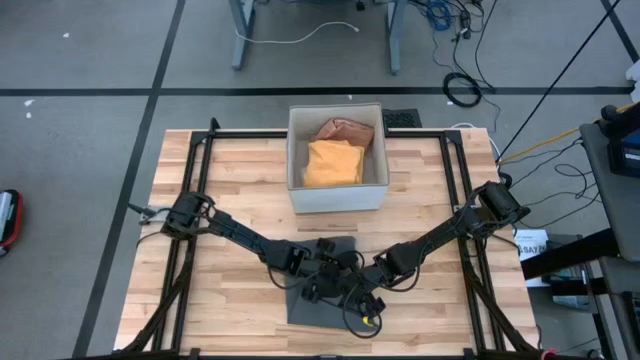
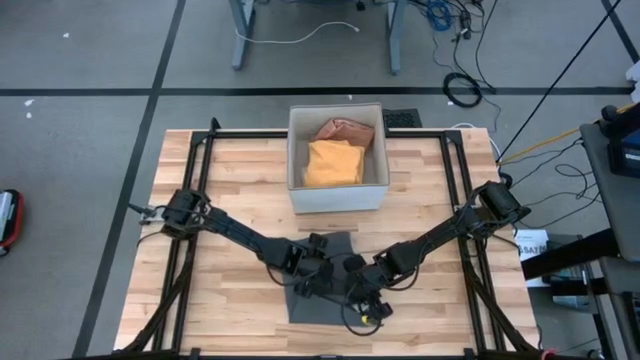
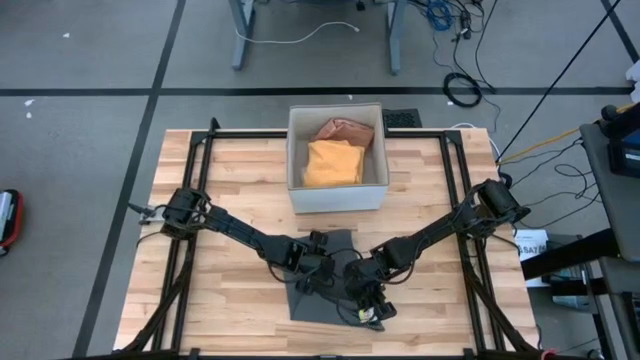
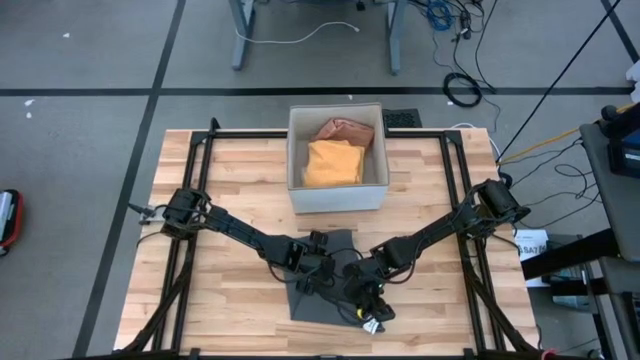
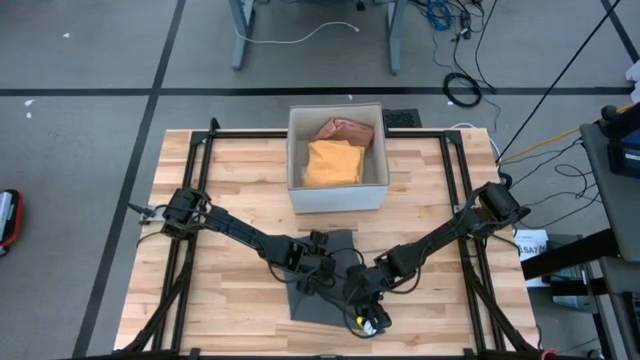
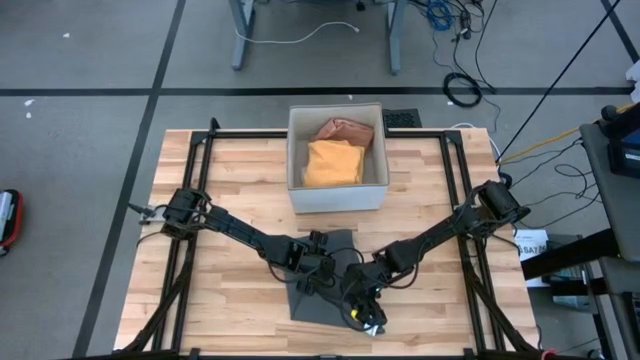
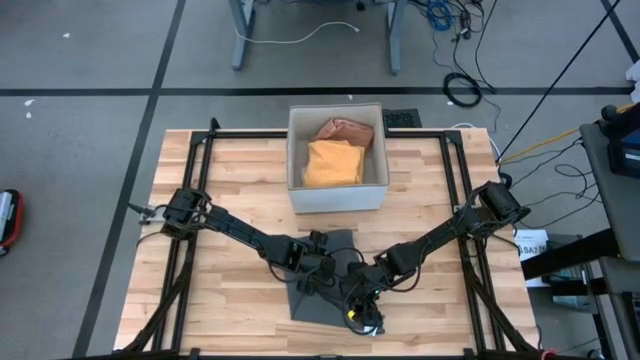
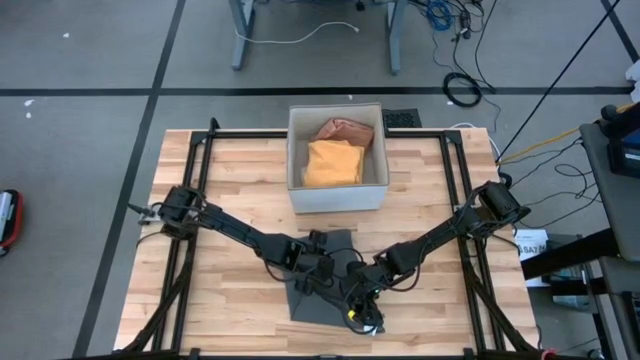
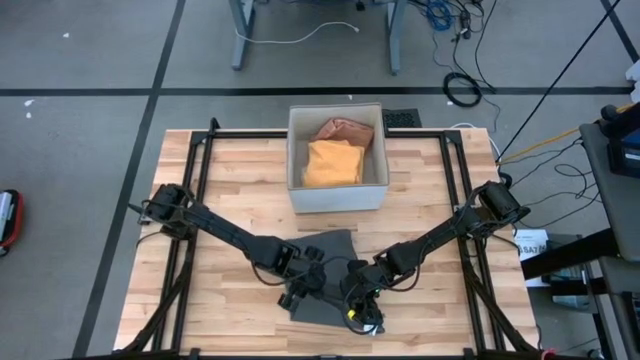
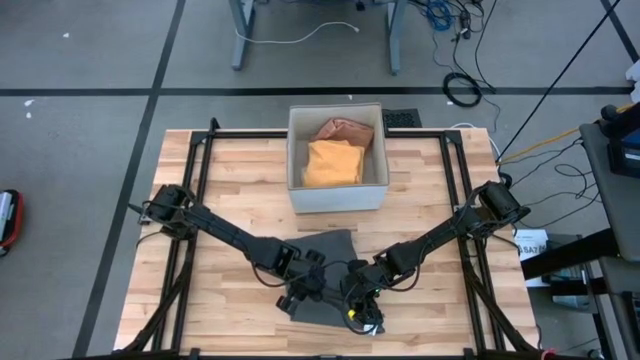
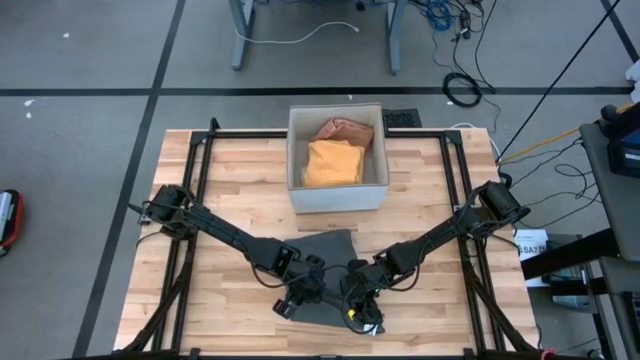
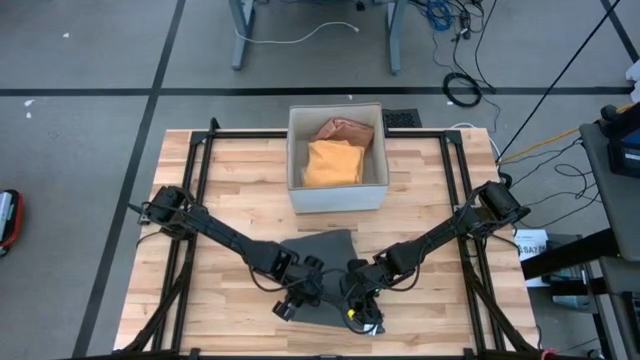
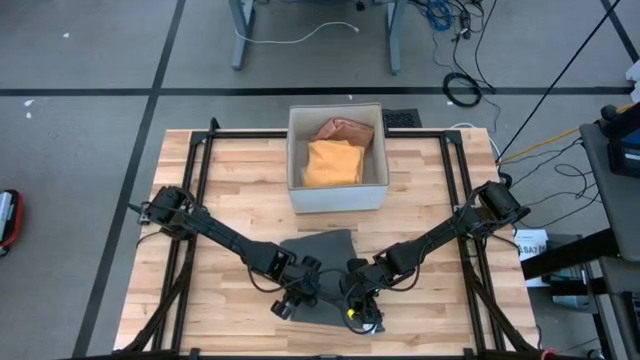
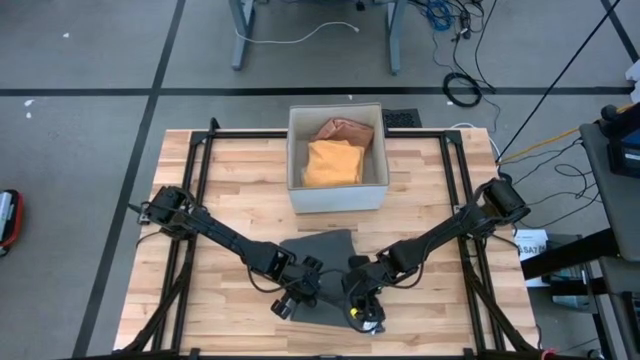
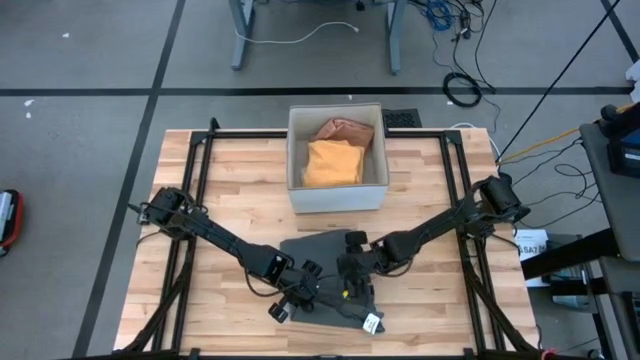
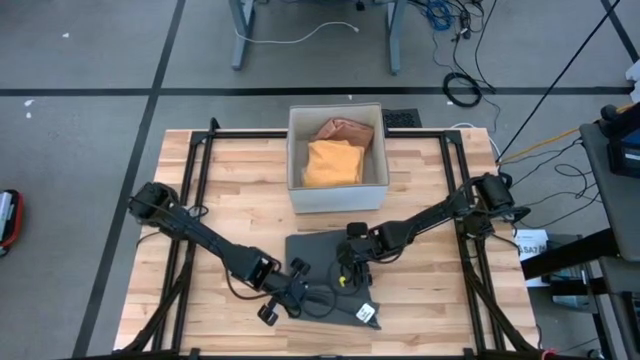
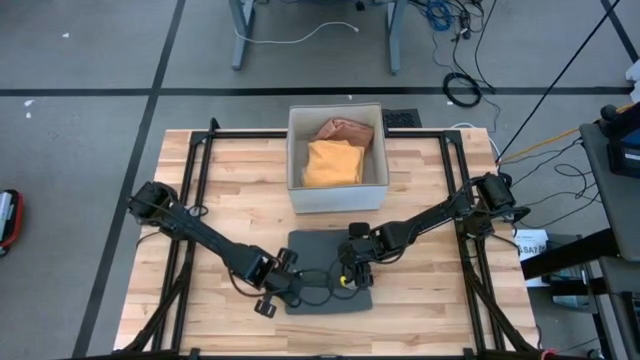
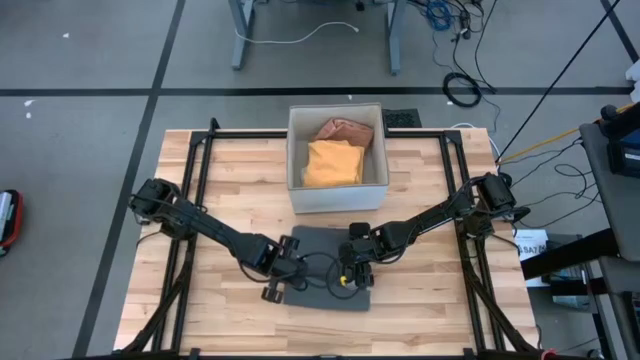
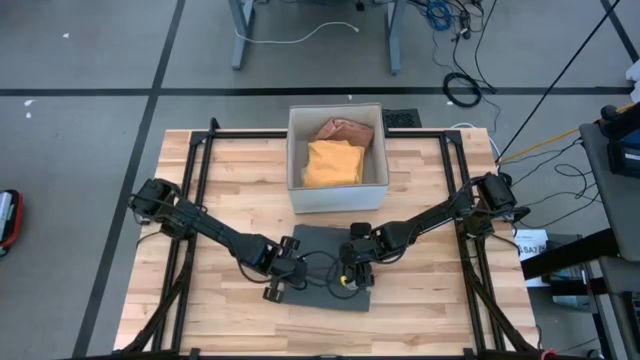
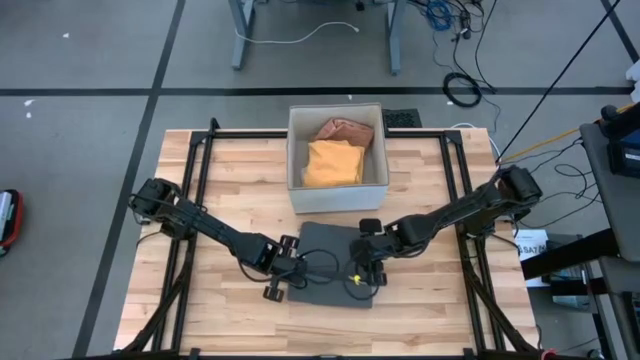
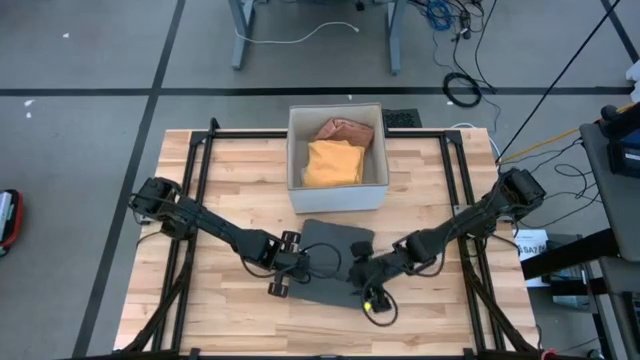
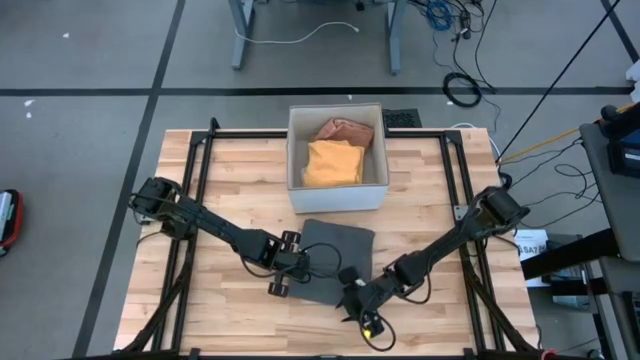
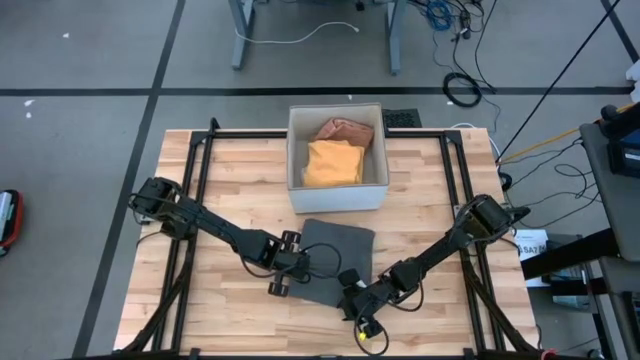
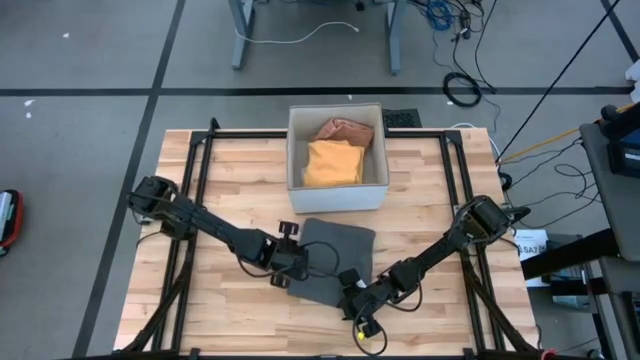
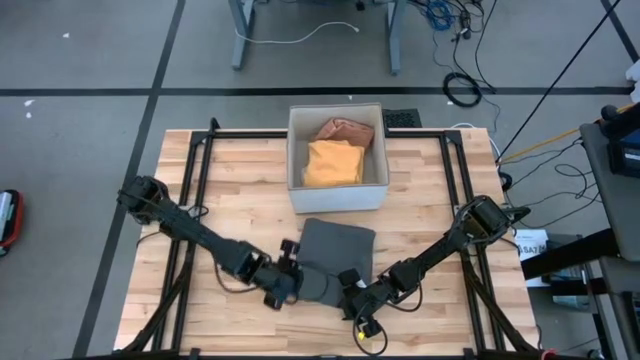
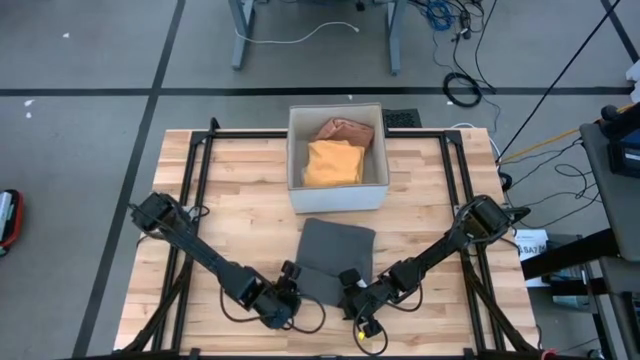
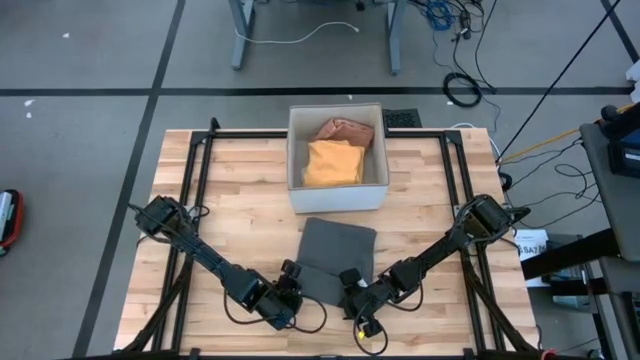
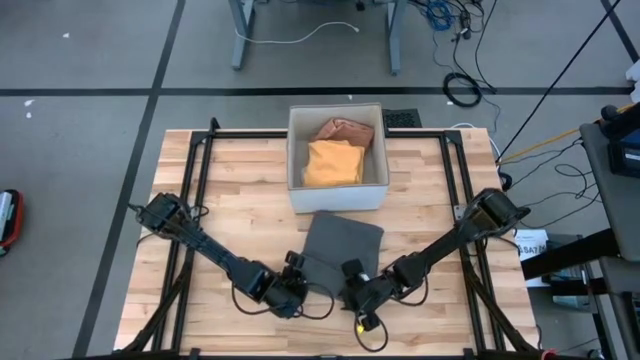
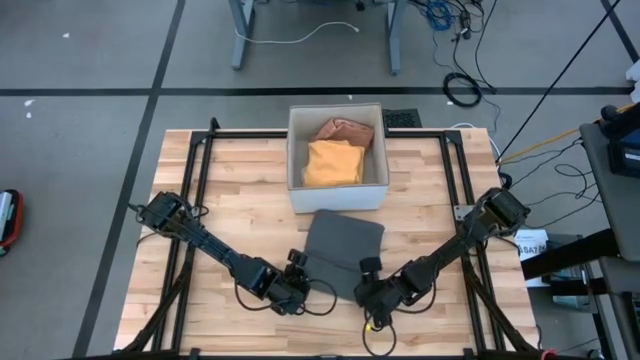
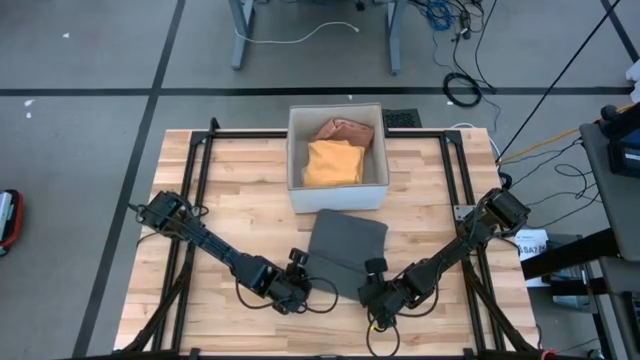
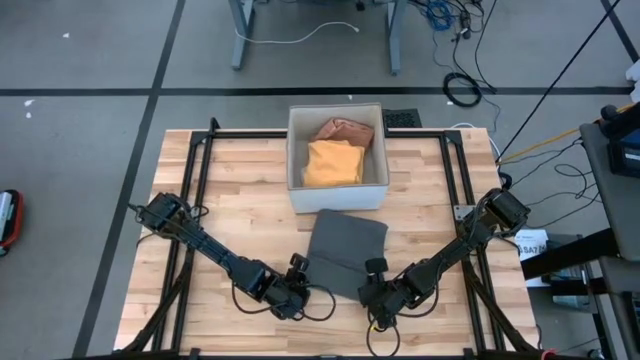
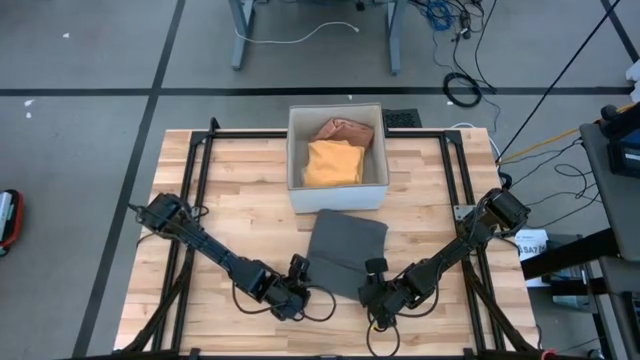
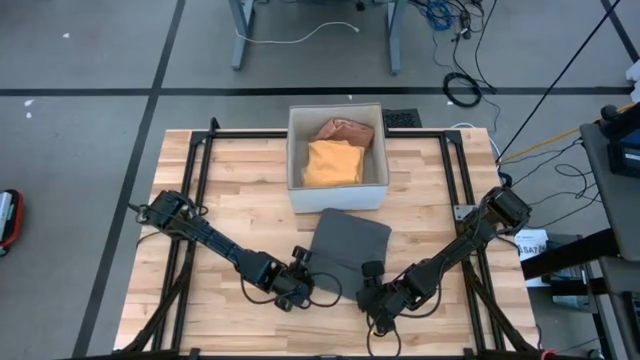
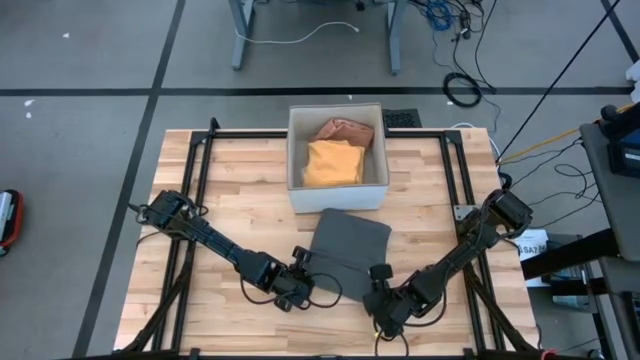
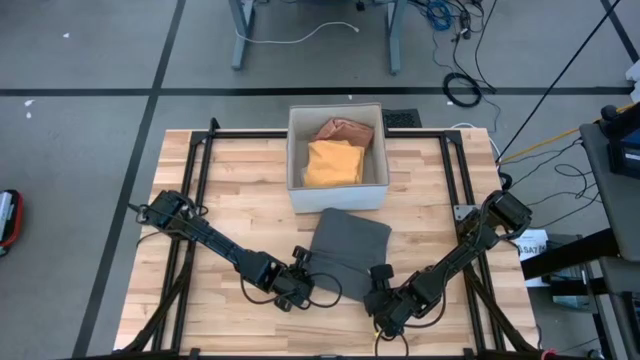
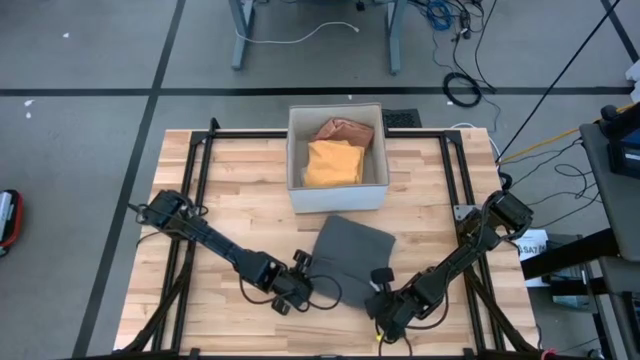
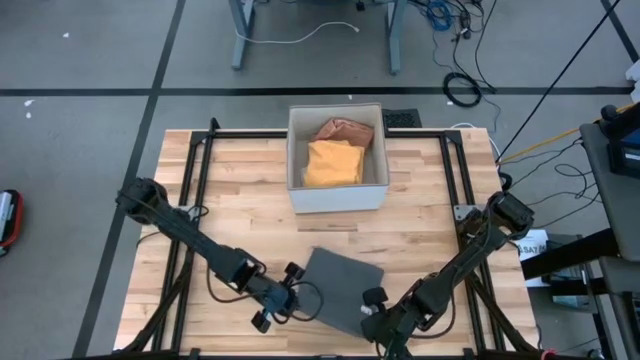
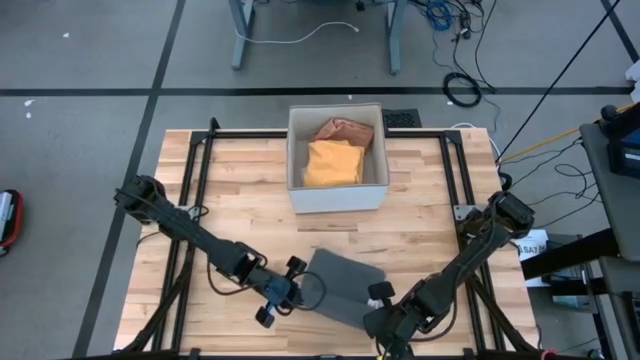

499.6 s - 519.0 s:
Task: Fold towel
Fold the gray towel
